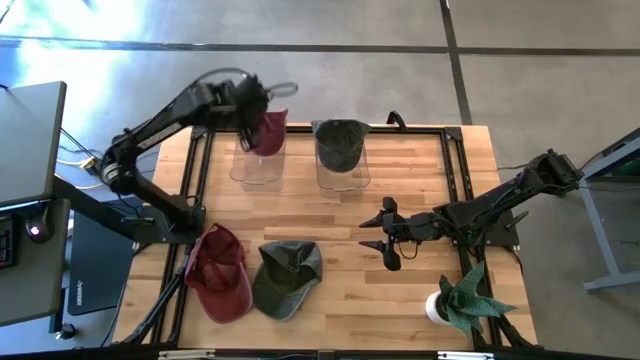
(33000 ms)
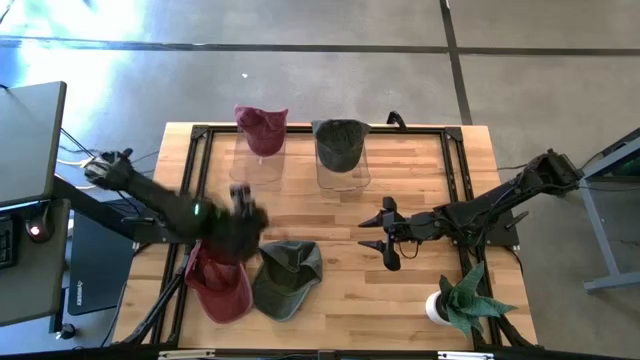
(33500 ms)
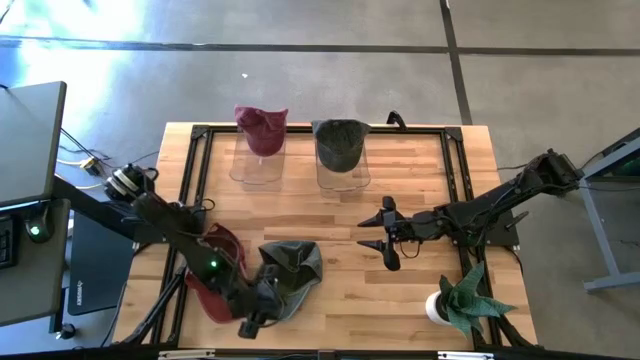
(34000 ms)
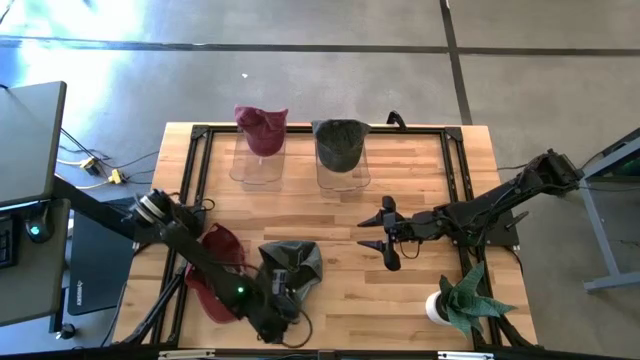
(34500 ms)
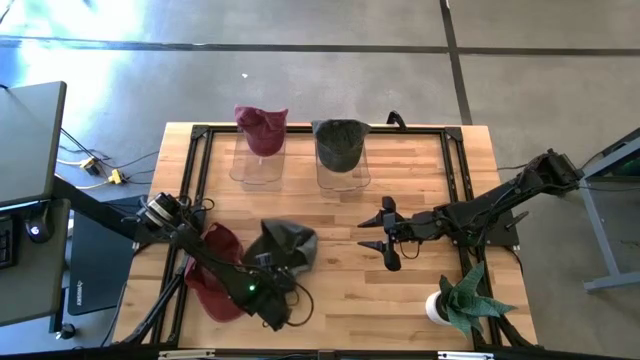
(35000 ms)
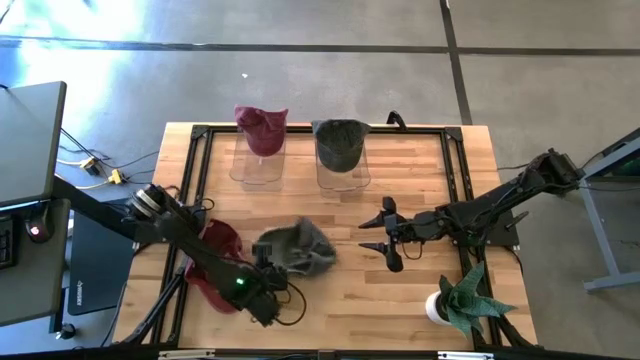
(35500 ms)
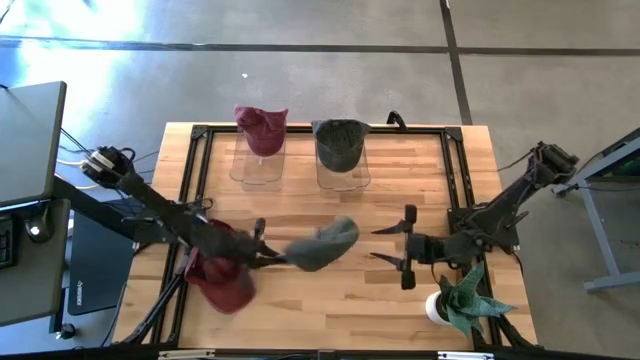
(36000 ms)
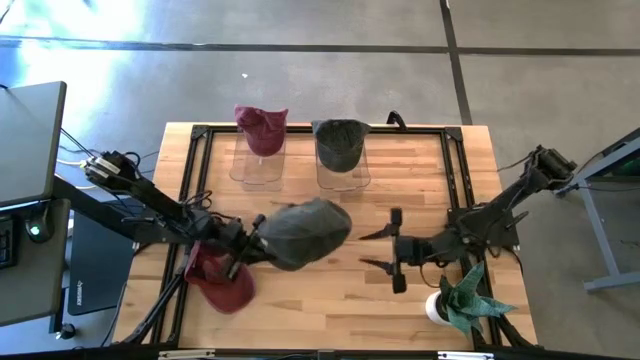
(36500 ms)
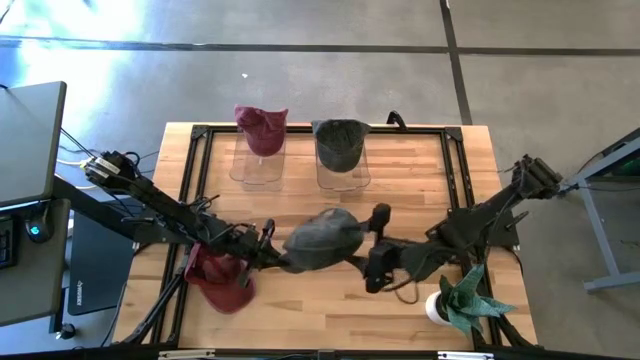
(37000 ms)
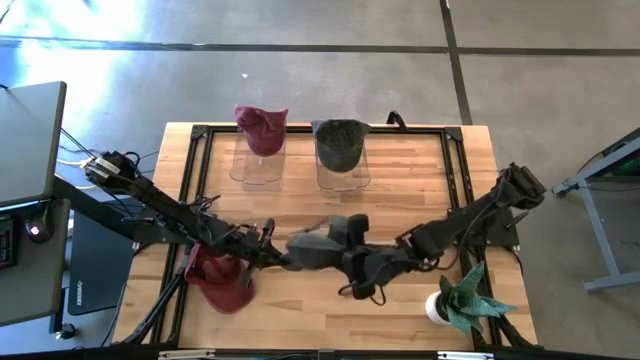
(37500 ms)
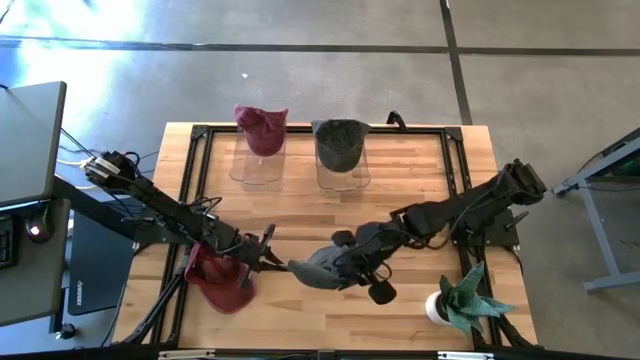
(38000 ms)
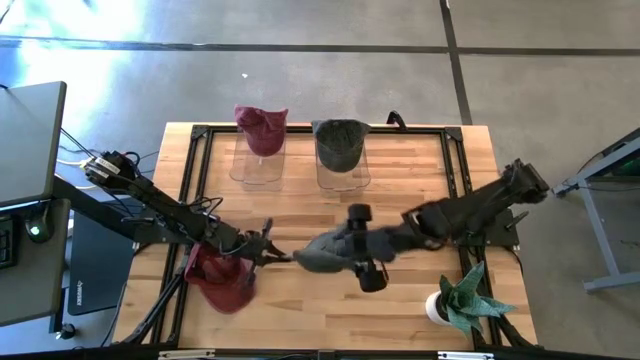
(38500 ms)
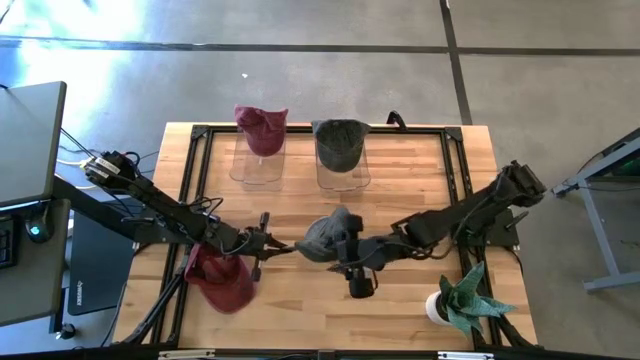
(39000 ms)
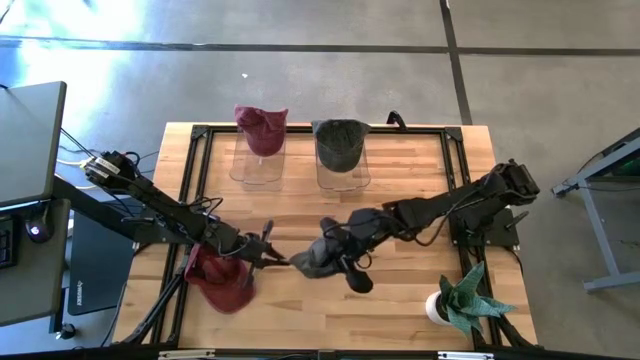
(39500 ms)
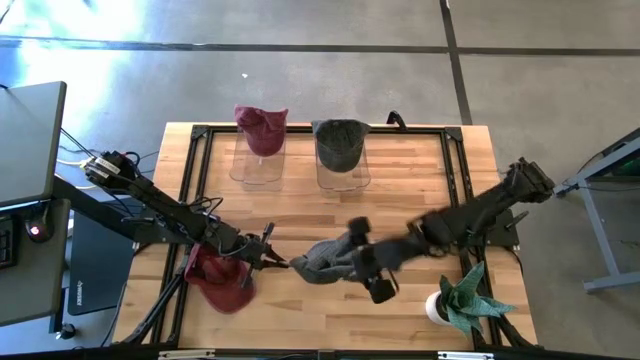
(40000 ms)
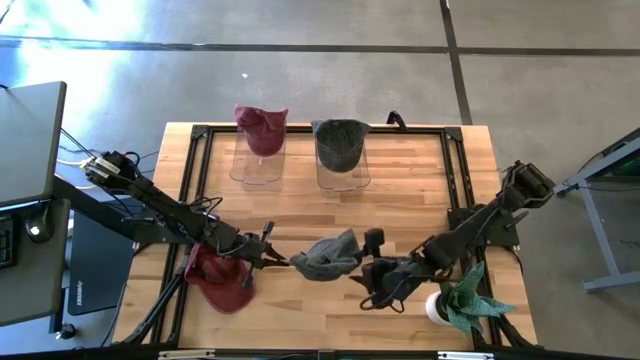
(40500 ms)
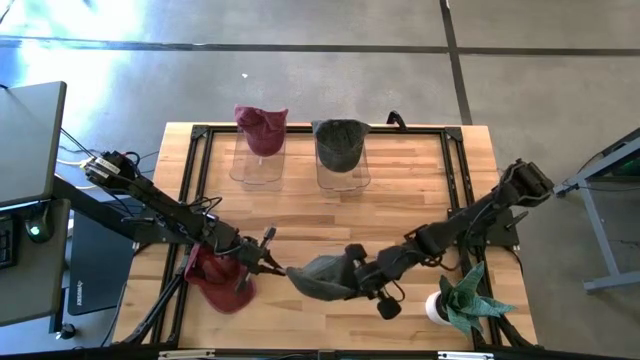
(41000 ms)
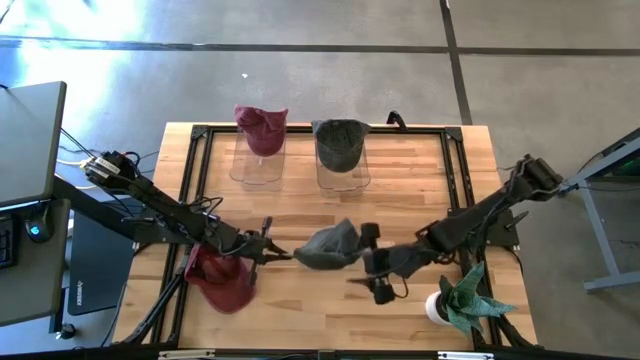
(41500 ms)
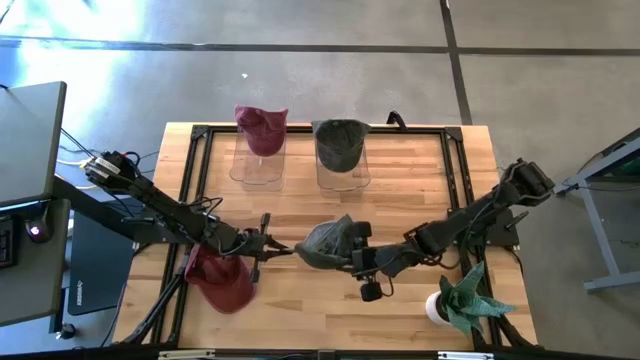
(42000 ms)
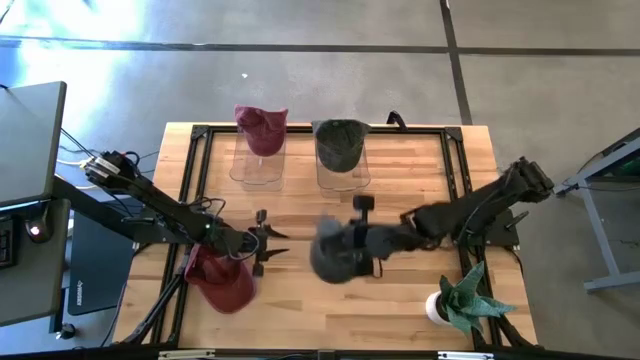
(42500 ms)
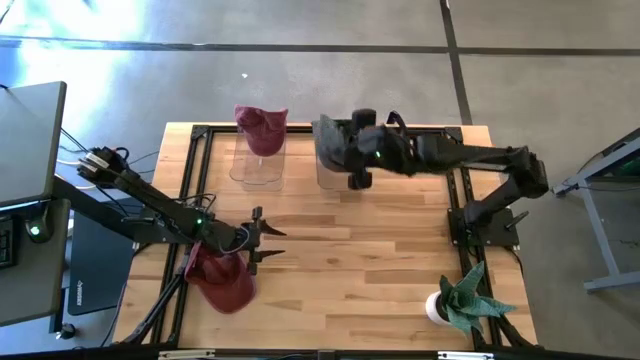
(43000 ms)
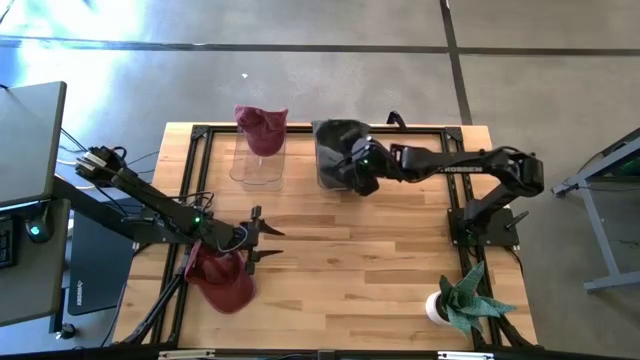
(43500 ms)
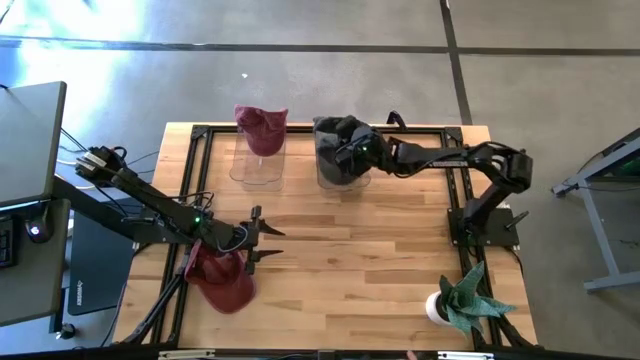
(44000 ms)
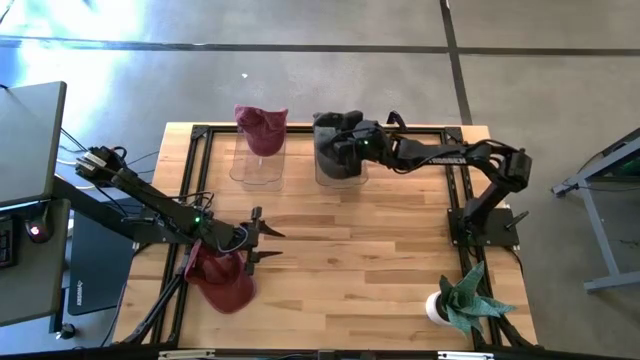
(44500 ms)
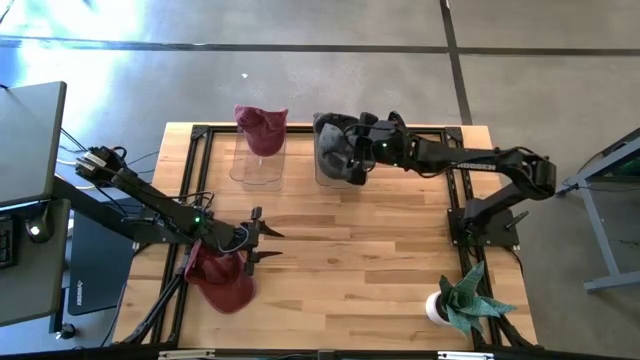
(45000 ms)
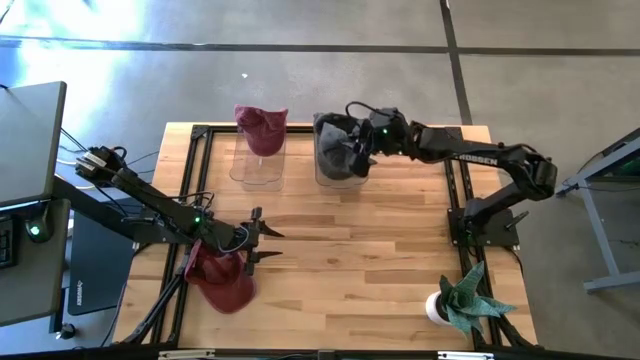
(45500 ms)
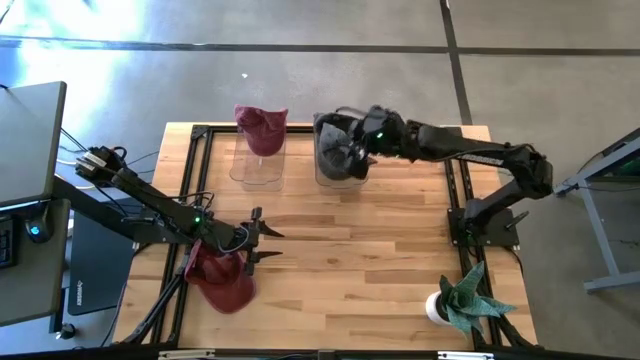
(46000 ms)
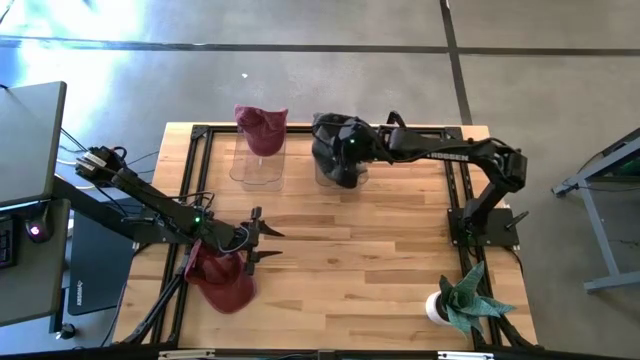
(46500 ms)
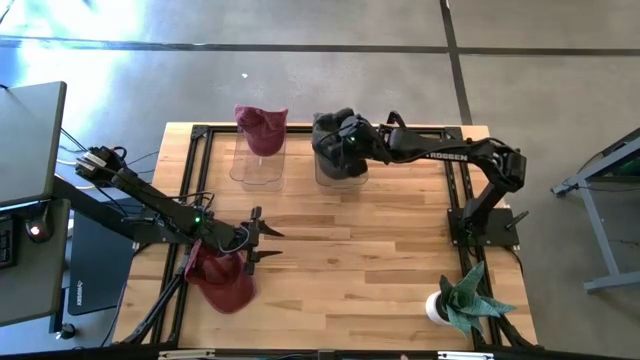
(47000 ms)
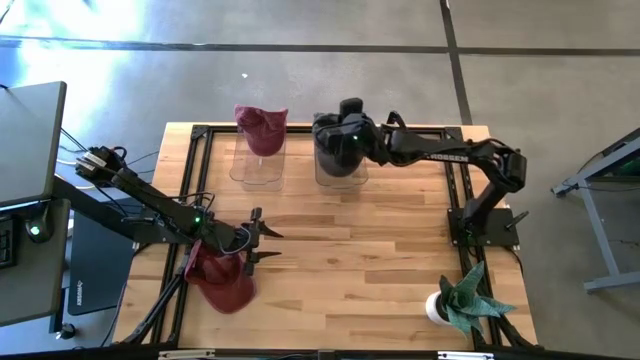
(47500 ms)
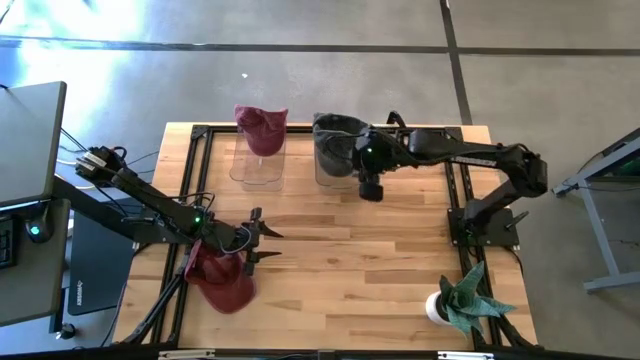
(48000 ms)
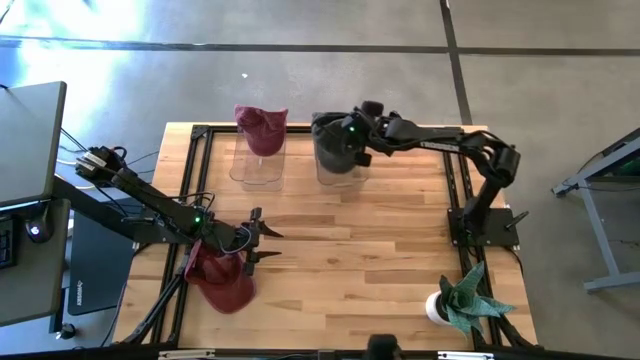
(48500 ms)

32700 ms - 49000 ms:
Task: Pick & Place hat
Put the gray cap into the right transparent bin

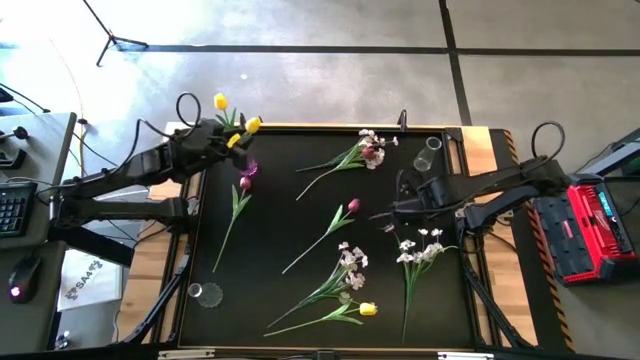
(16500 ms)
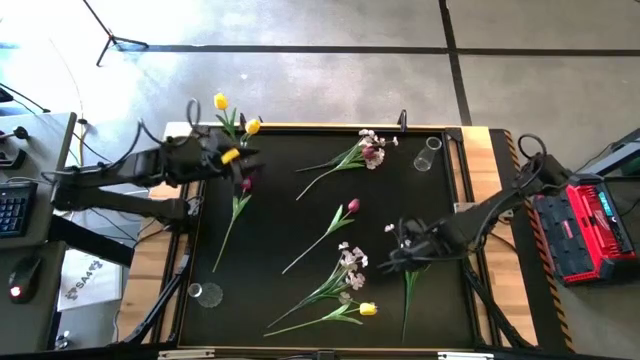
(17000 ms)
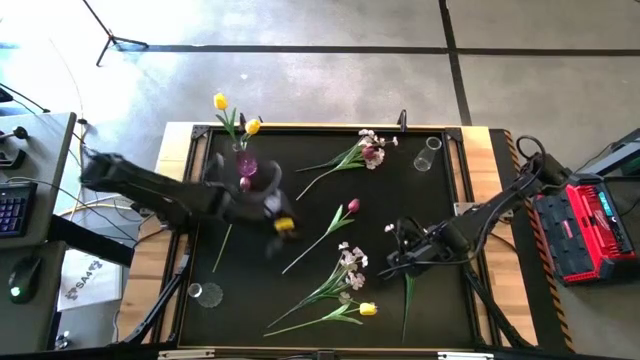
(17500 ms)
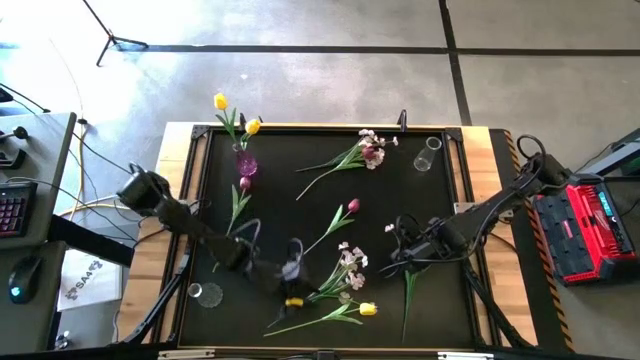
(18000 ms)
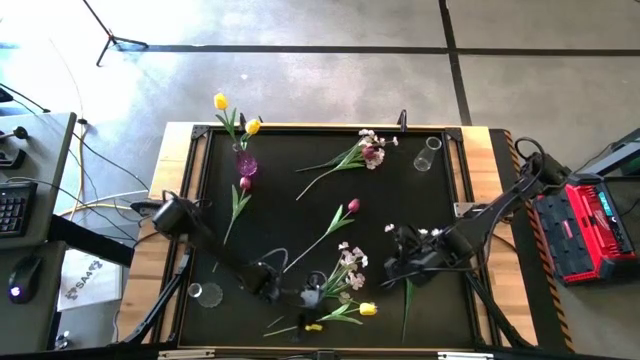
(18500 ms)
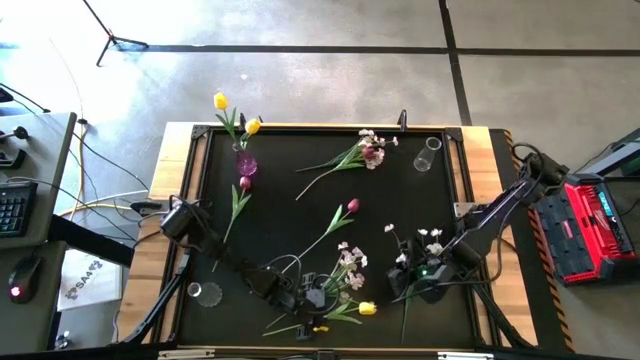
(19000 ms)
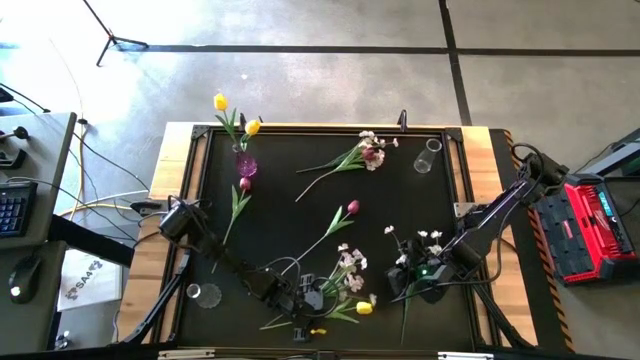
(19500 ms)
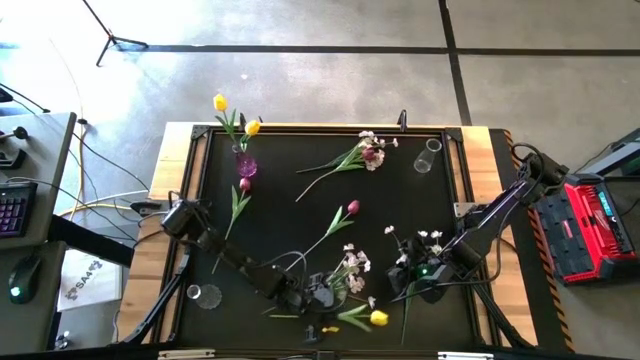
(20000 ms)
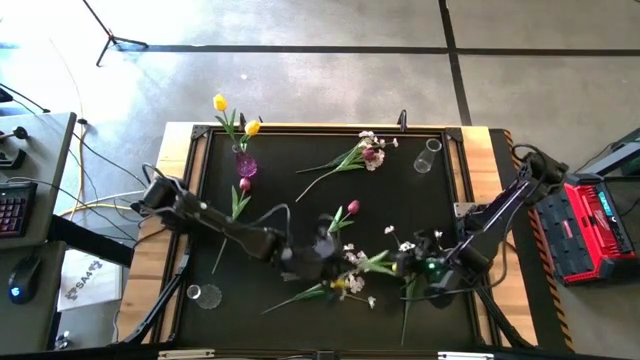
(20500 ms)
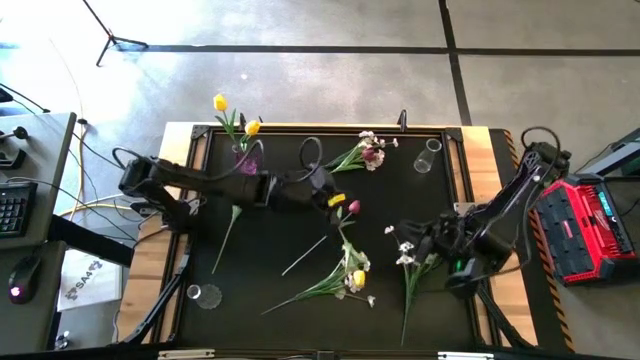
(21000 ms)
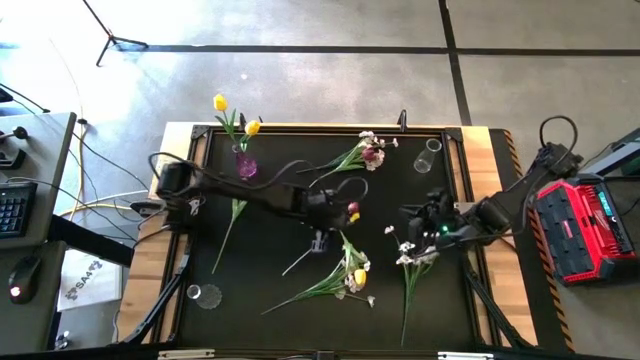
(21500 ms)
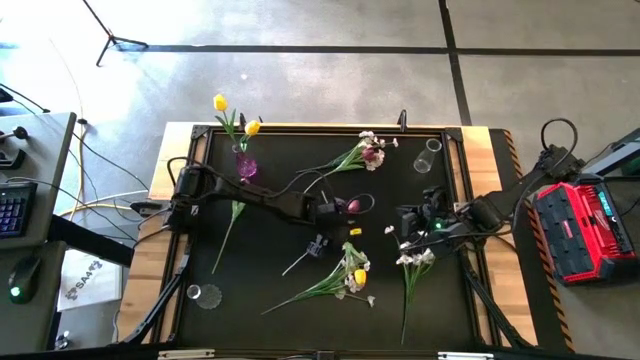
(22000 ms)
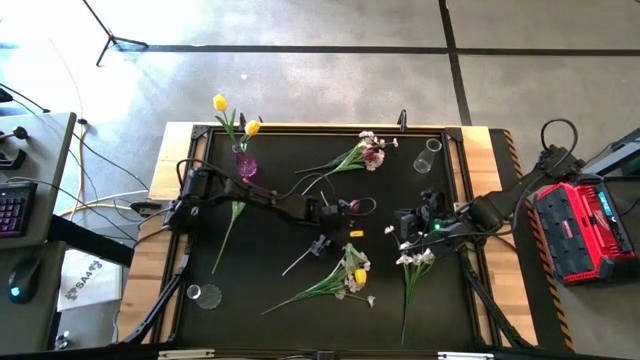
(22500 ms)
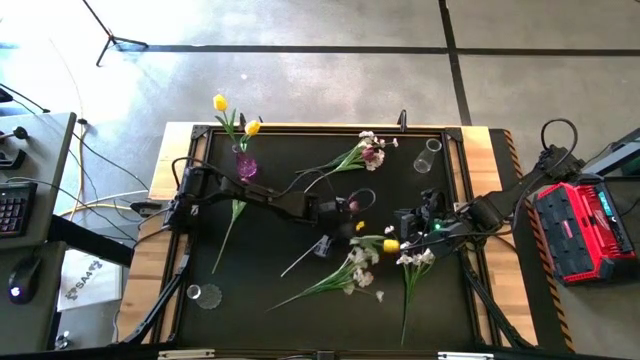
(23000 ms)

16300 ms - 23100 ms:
Task: Sort flowers into vase by color
Put the yellow flower into the violet vase
